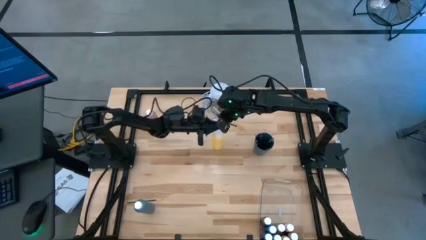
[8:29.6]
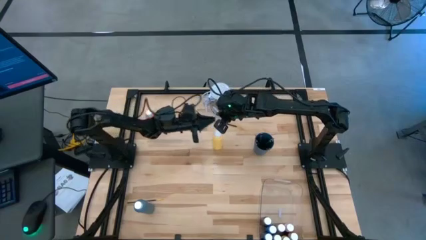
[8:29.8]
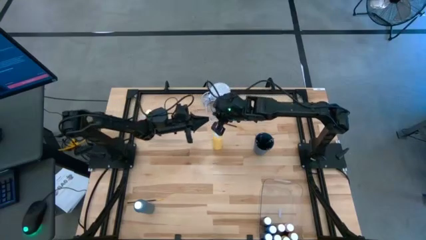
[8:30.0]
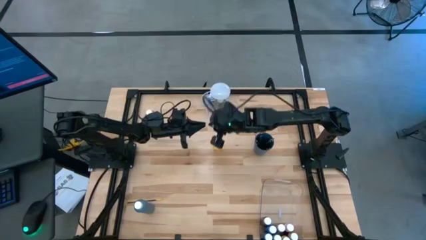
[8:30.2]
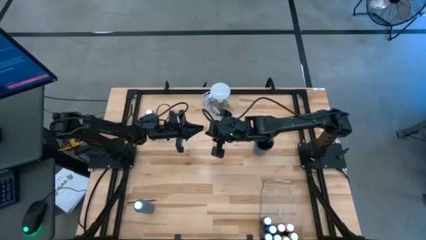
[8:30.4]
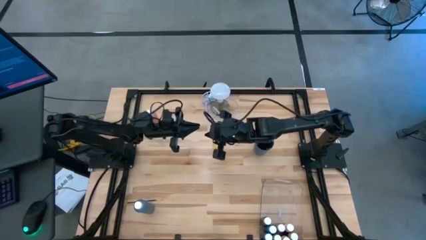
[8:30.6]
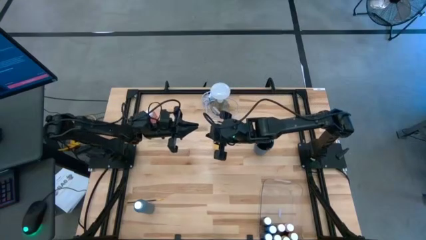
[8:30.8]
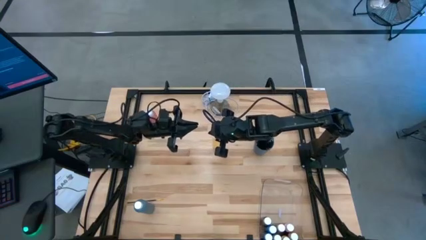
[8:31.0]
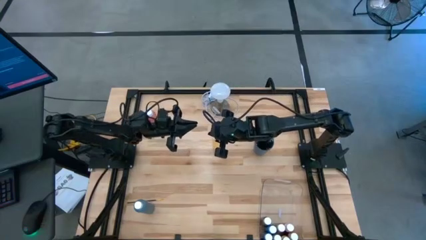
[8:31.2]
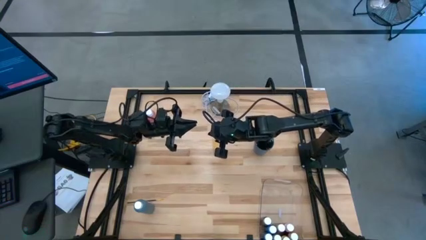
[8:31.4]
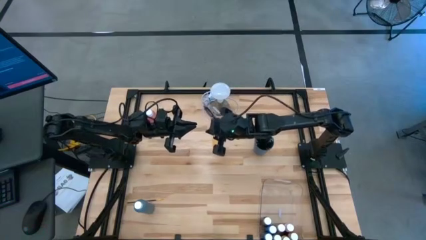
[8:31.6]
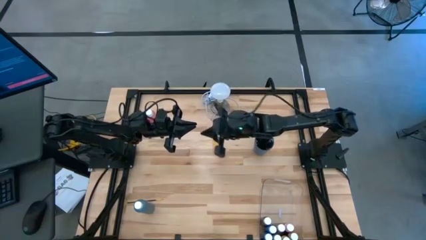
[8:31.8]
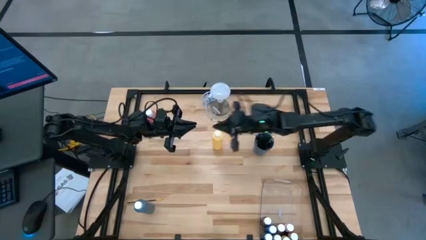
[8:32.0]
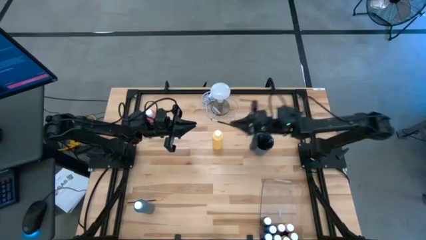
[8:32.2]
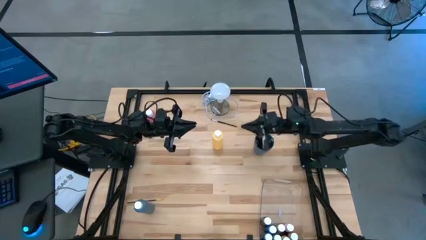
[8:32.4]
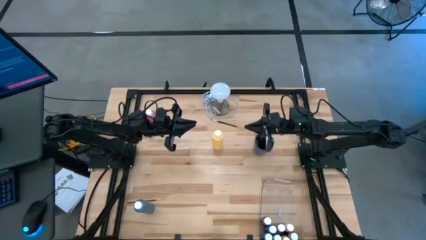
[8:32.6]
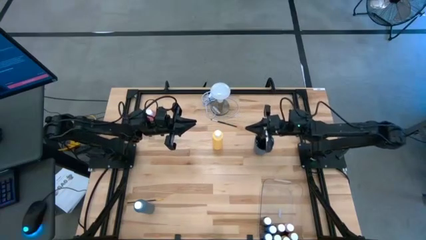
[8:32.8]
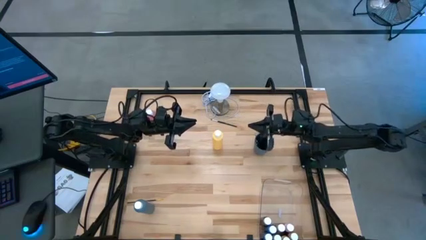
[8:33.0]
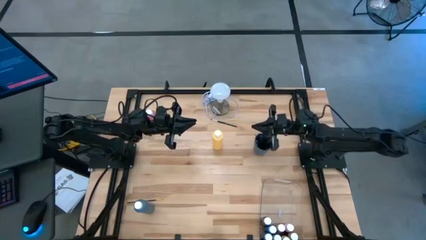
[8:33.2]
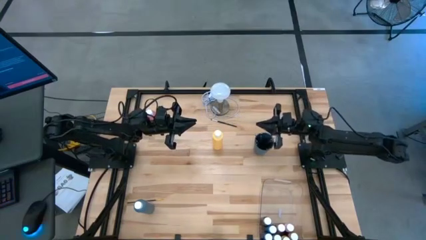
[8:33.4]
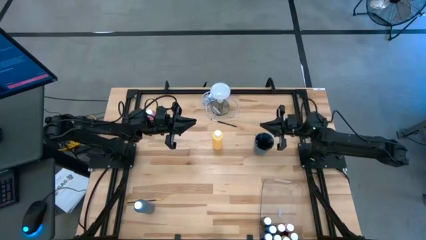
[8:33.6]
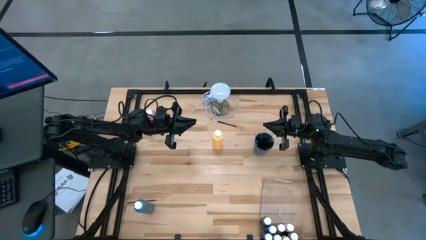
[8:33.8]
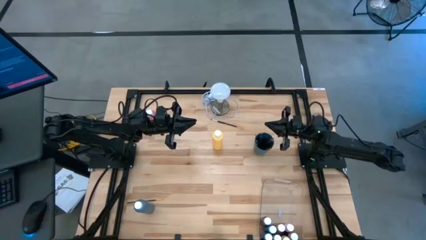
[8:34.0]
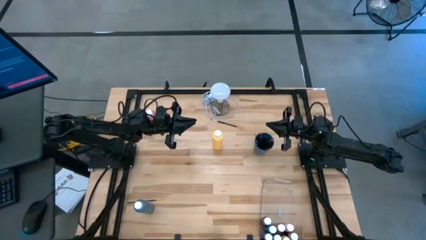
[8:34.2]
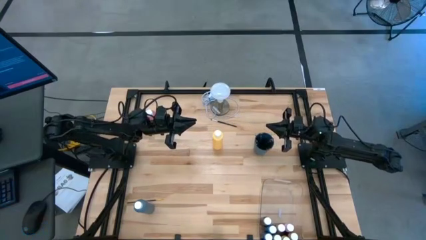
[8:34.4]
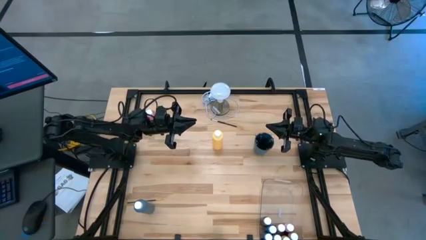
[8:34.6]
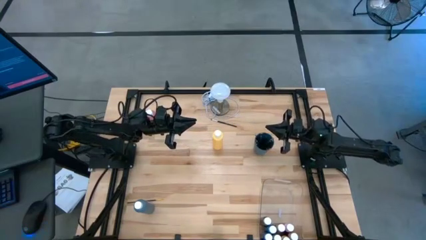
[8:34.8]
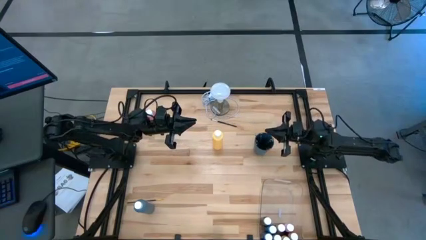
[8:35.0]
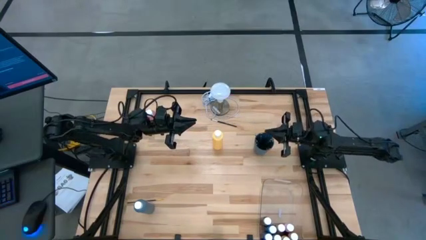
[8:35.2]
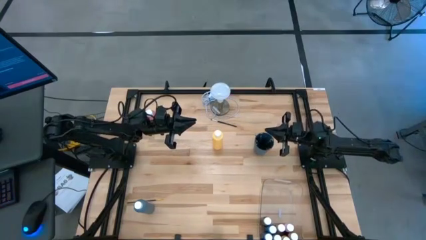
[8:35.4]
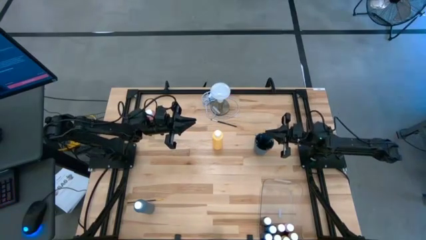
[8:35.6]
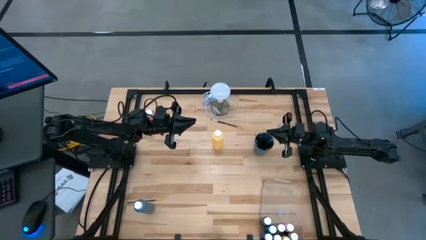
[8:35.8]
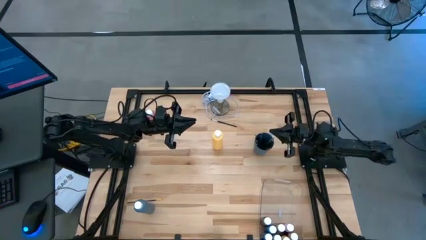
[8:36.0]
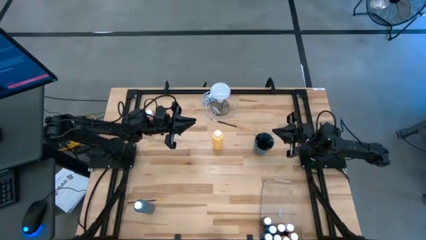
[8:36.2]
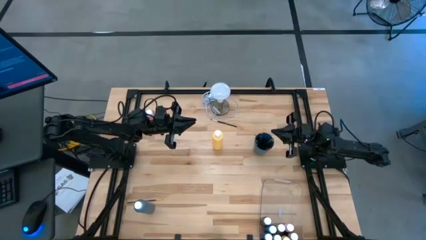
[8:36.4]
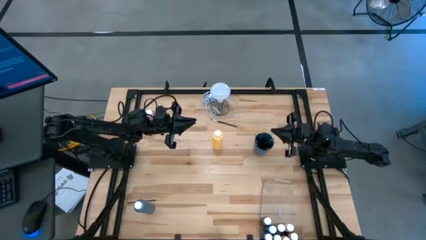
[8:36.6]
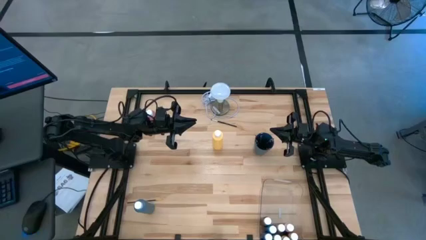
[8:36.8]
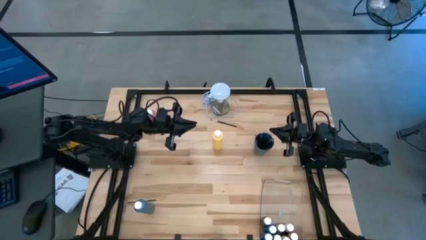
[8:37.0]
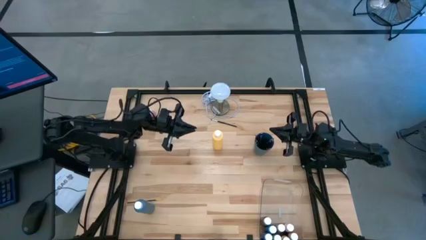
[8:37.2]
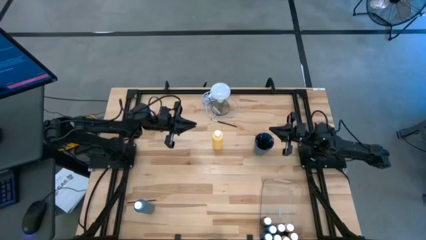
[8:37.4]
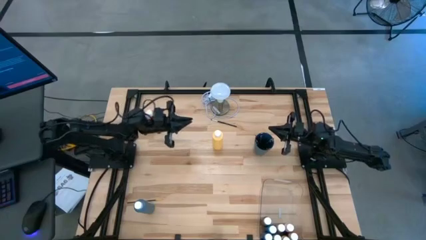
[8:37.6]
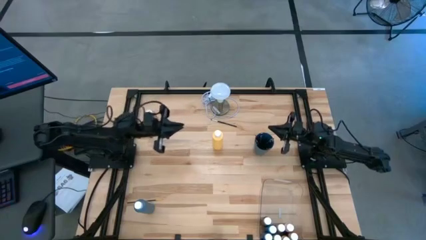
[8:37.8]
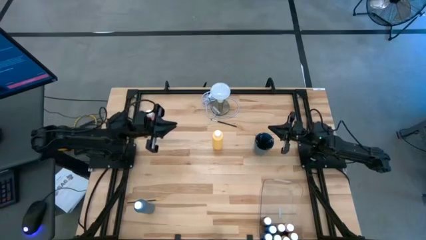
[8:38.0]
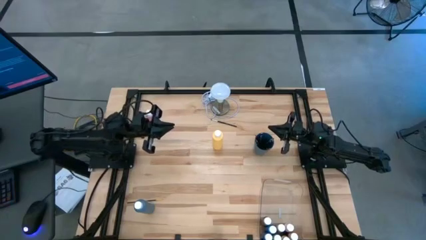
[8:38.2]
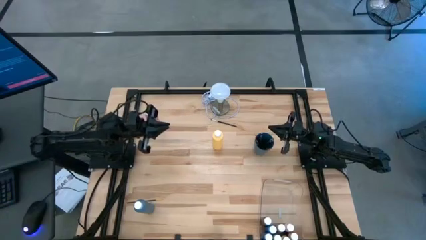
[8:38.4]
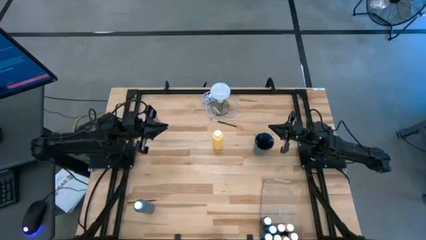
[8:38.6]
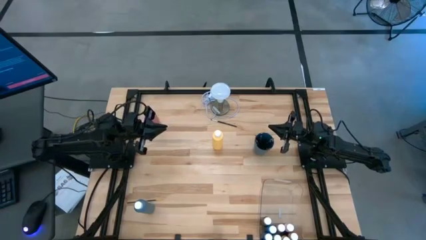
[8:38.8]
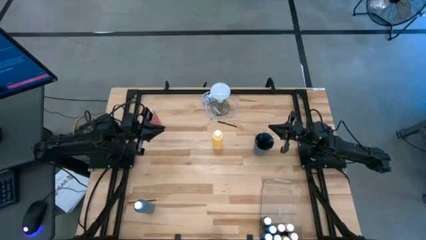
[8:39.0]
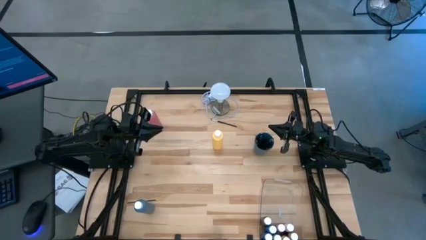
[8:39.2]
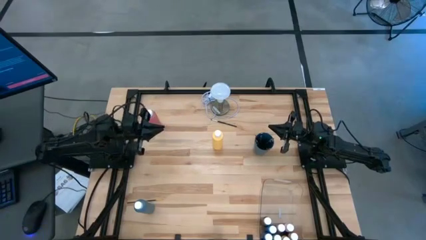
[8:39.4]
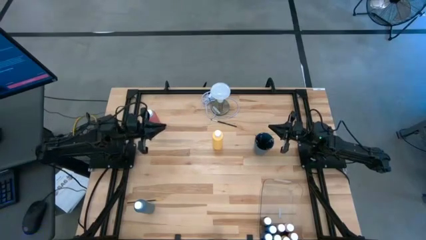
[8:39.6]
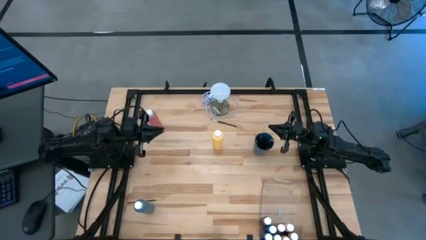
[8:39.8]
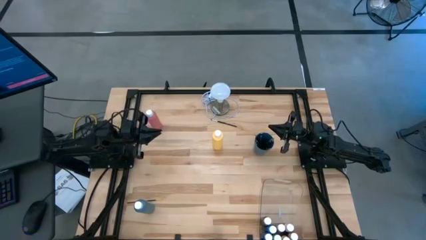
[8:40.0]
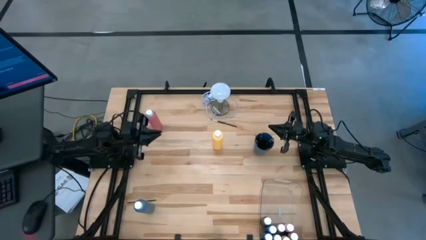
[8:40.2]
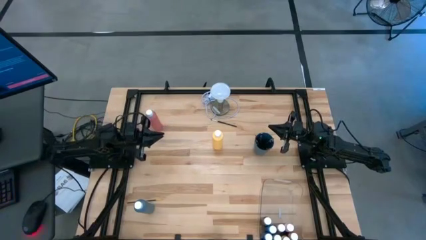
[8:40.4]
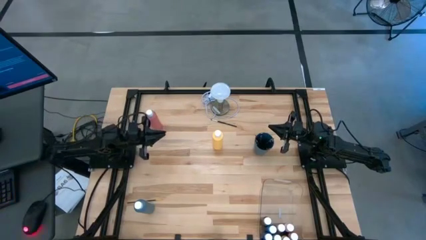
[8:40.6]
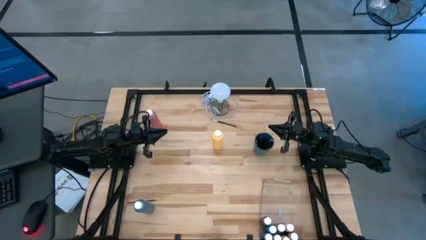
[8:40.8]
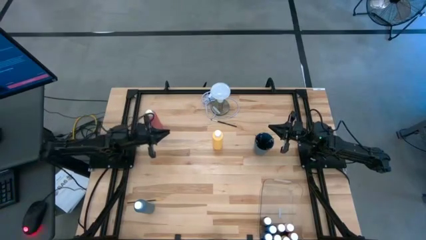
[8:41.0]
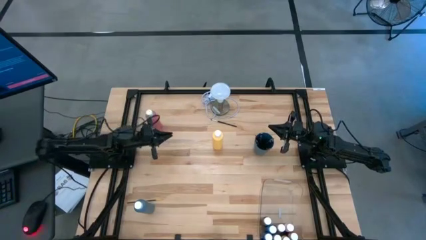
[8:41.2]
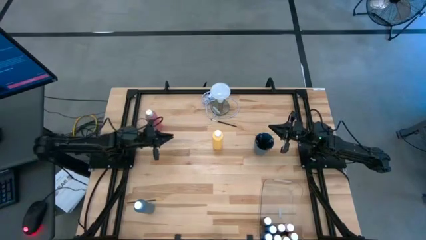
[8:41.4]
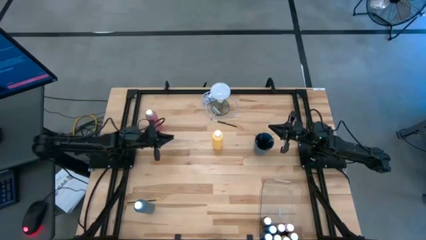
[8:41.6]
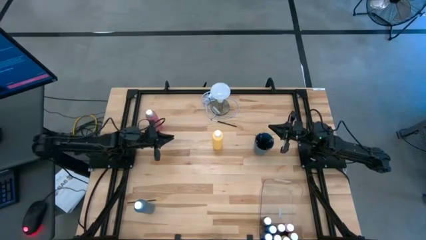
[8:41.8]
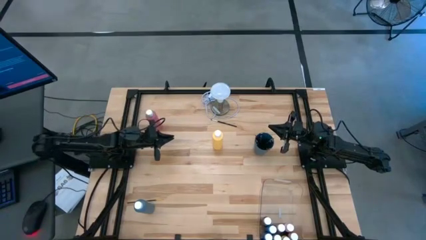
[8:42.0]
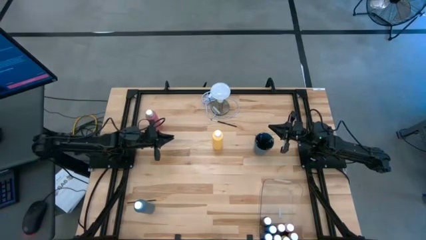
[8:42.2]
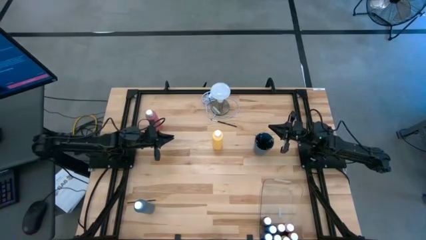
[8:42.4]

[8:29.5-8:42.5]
Task: Pick & Place Paint Supplies
Put the large yellow paint bottle into the bin

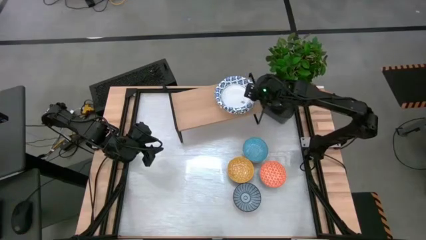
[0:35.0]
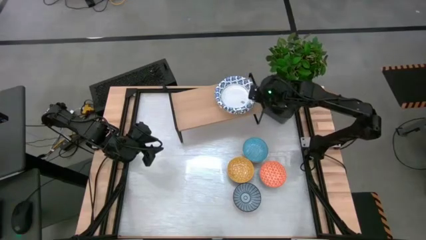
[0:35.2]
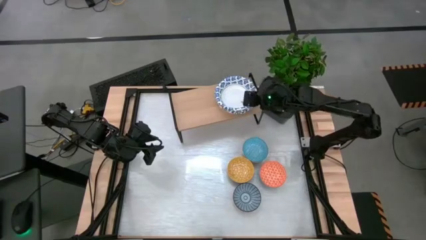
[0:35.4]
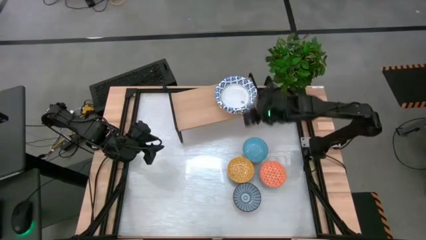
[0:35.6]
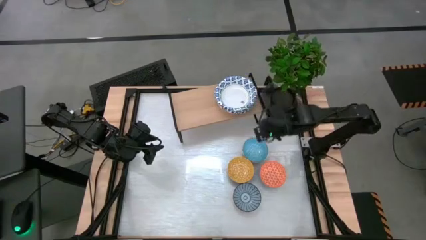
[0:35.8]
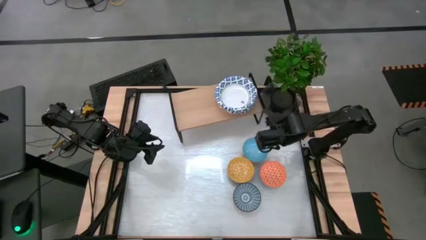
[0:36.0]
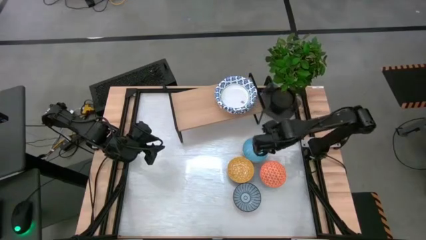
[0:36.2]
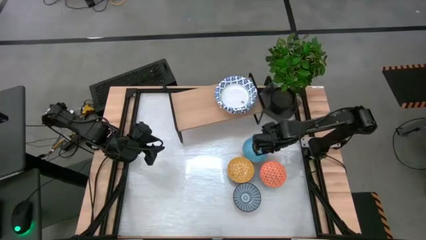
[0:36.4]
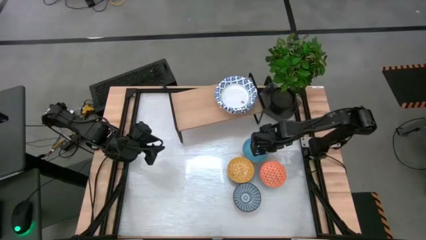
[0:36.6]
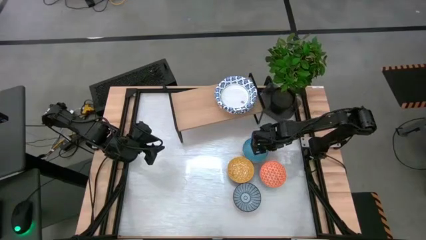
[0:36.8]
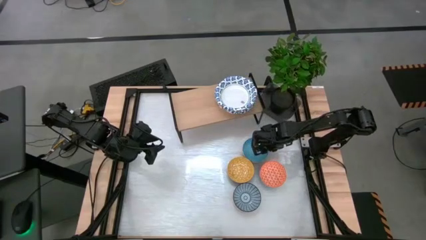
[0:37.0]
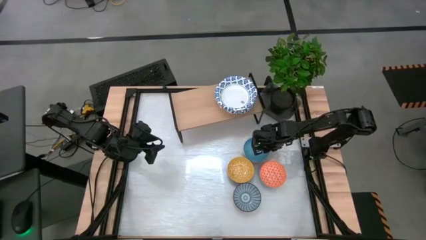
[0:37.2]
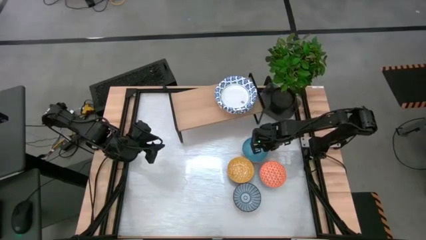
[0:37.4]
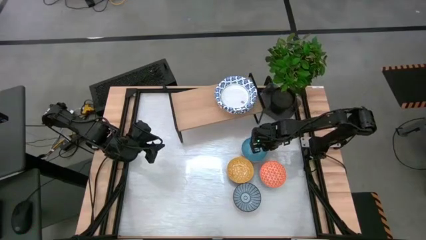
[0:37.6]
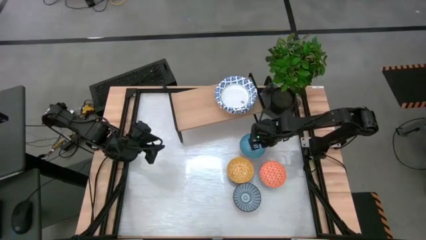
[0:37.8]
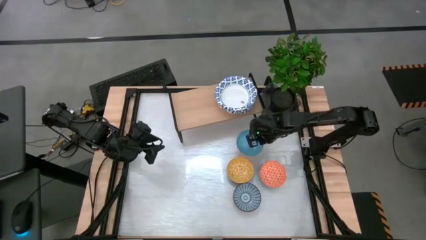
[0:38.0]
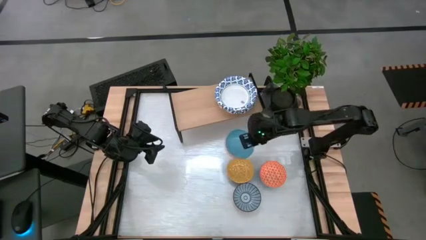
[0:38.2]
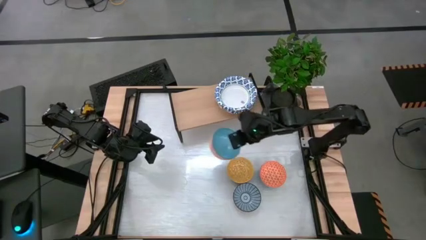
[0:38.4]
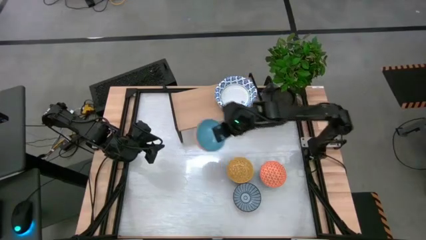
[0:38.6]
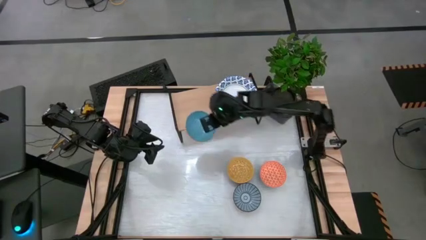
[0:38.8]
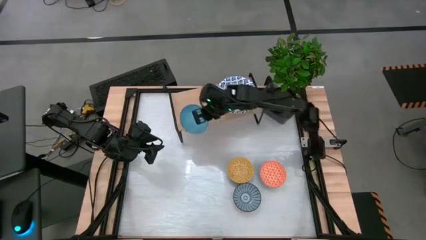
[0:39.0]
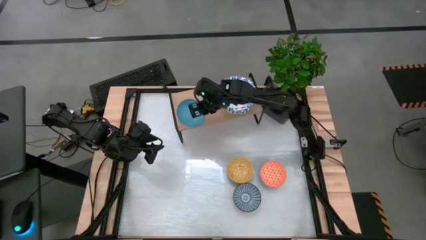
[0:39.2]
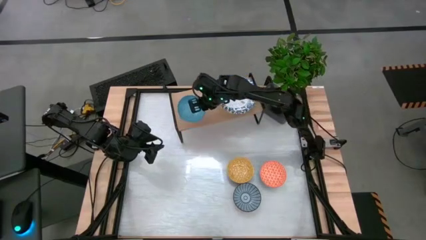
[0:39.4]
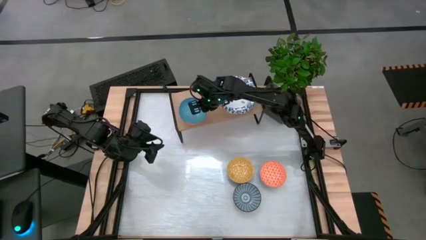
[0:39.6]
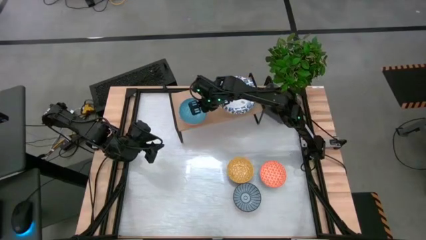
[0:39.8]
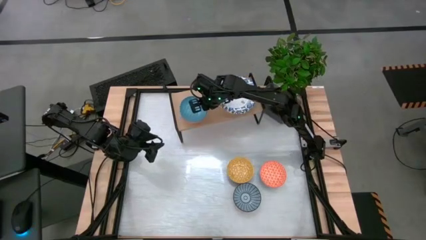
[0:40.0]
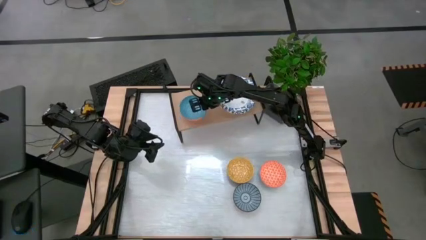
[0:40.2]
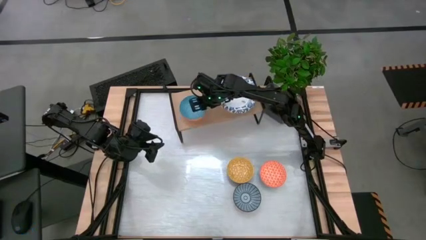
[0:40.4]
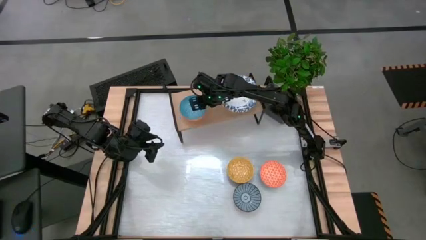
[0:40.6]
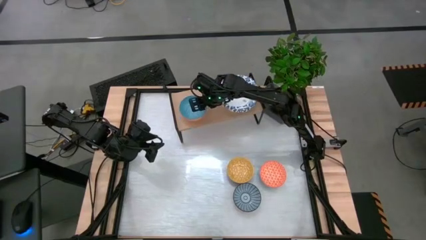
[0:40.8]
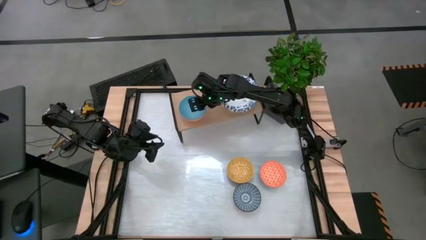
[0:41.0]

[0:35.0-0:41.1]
Task: Place and stack bowls onto a shelf
Put the light blue bowl on the shelf
